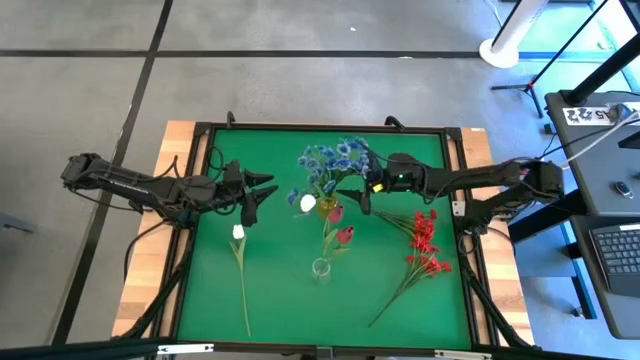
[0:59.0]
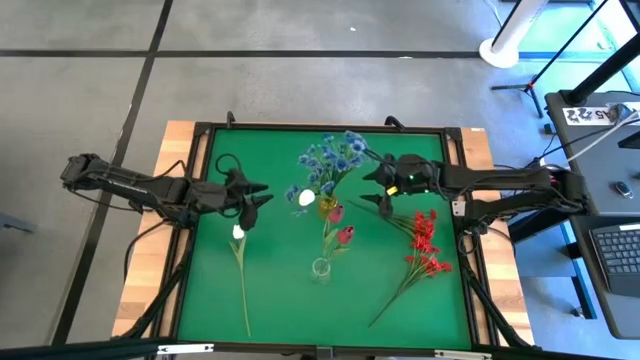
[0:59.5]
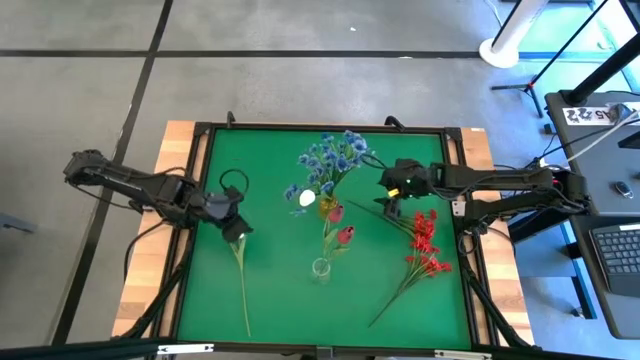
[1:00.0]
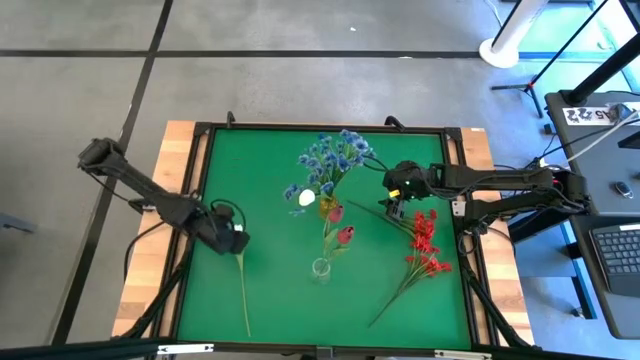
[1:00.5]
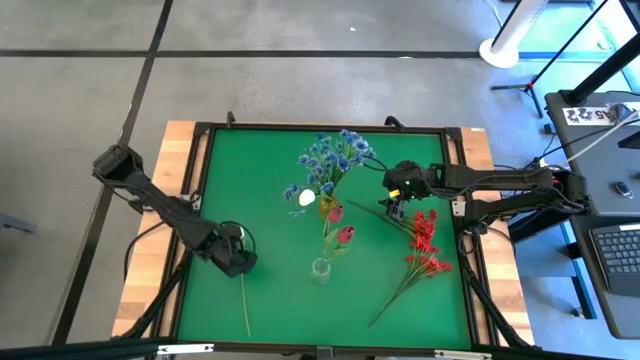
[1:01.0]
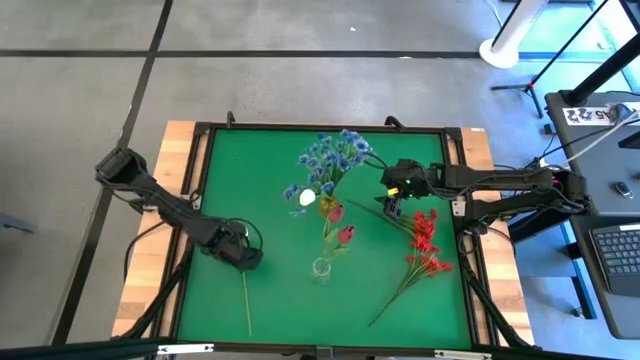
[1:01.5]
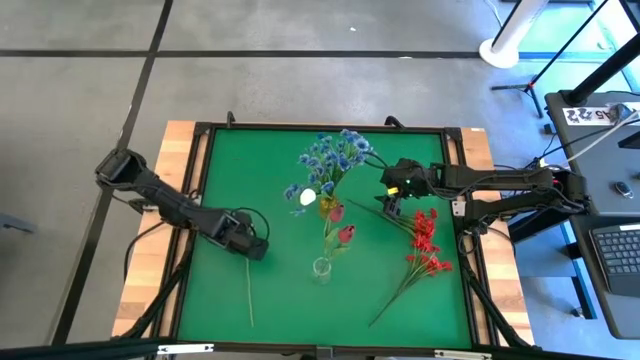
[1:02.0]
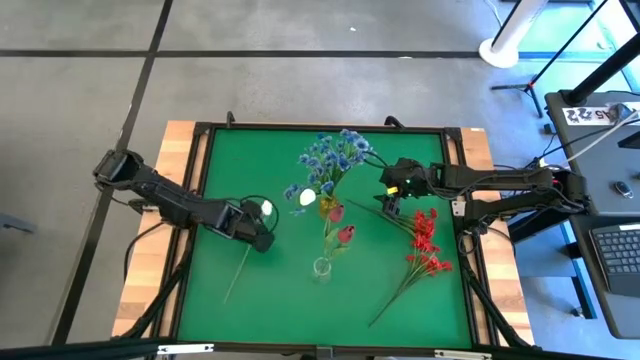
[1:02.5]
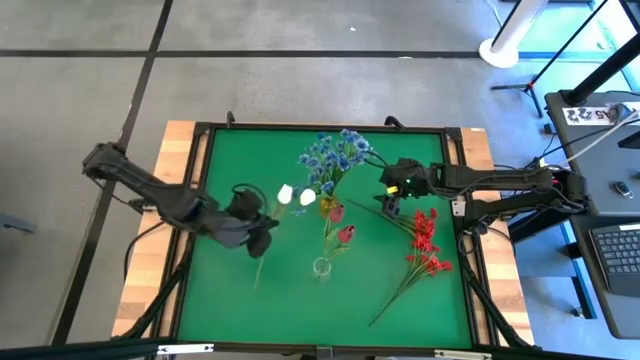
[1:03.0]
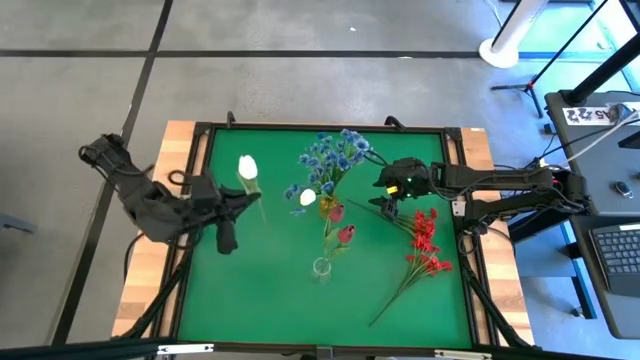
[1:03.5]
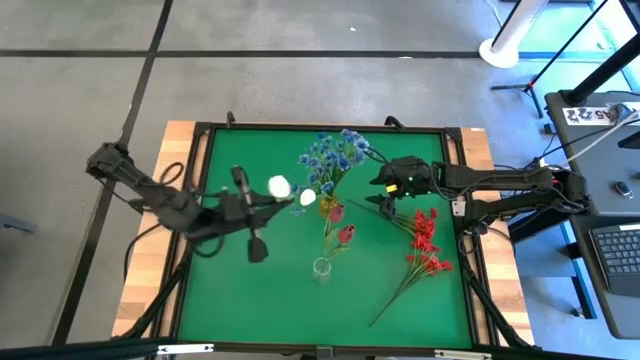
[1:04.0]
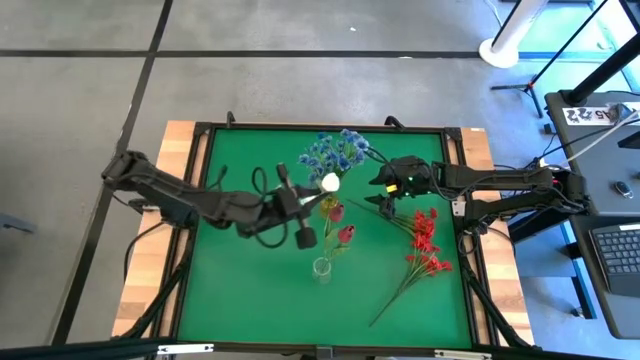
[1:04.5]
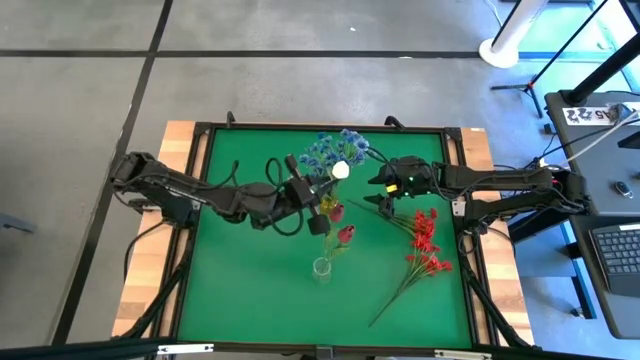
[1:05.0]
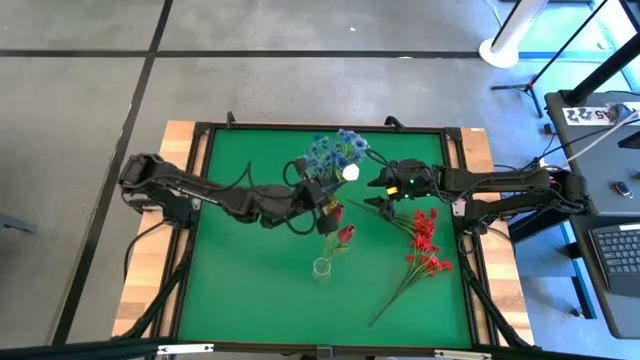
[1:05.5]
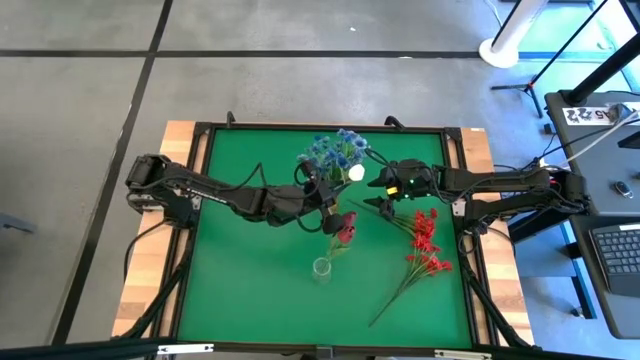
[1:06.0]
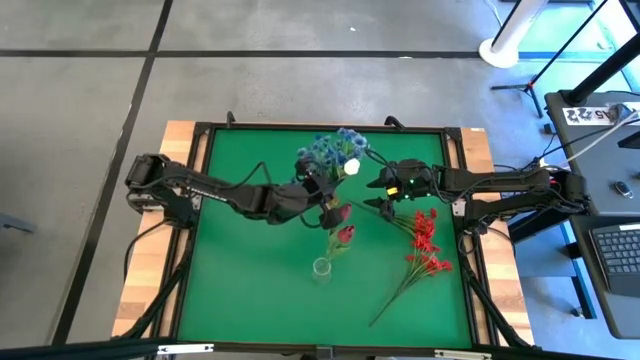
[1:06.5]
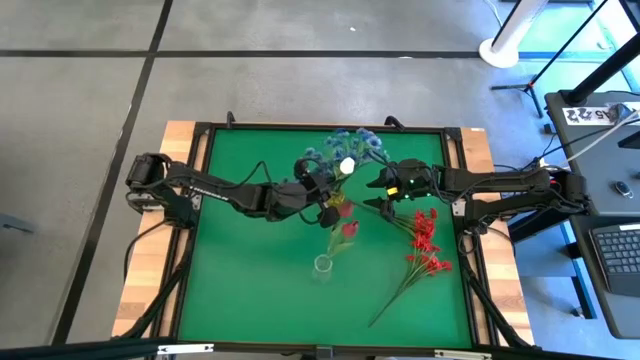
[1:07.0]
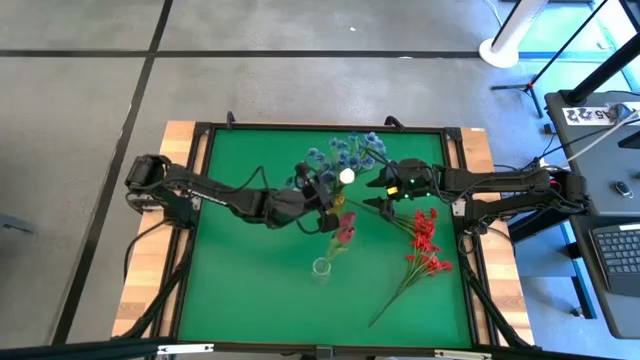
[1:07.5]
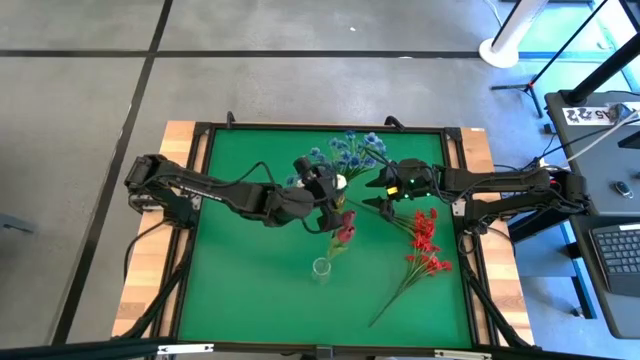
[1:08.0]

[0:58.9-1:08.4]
Task: Sort flowers into vase by color
Put the white flower into the yellow flower vase

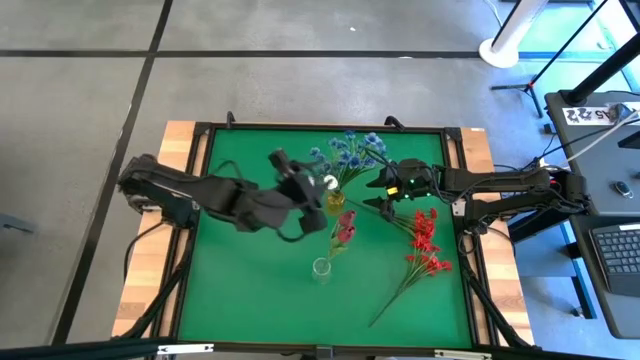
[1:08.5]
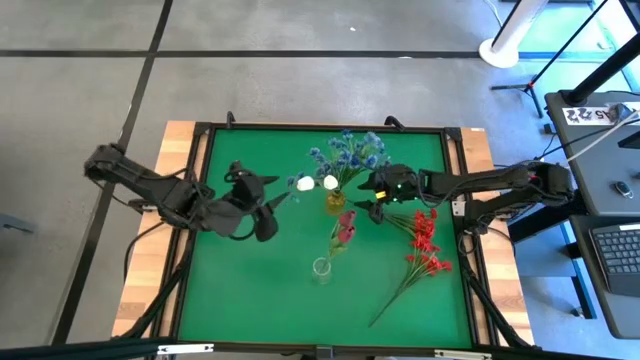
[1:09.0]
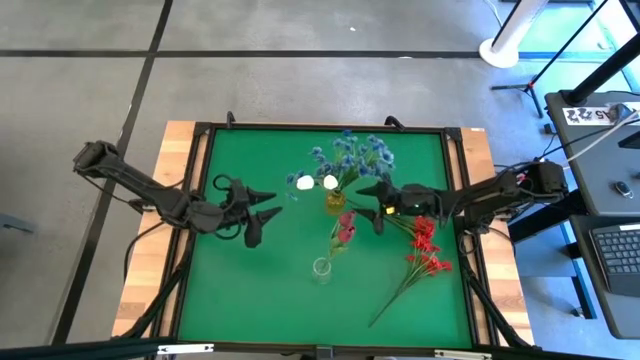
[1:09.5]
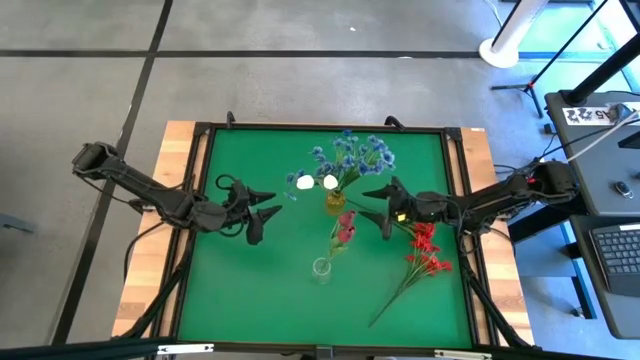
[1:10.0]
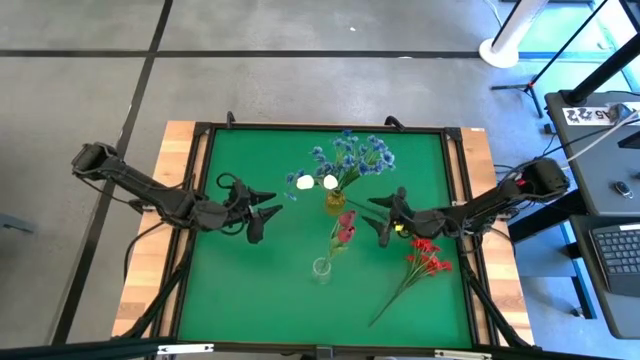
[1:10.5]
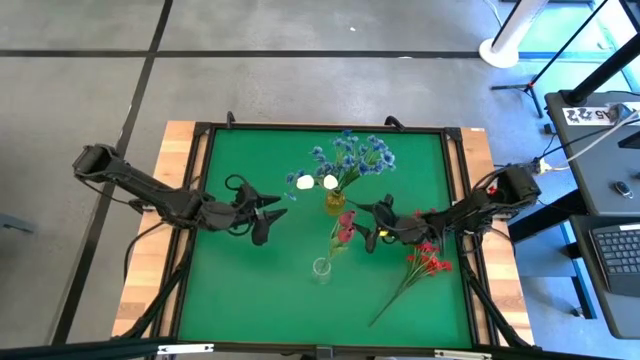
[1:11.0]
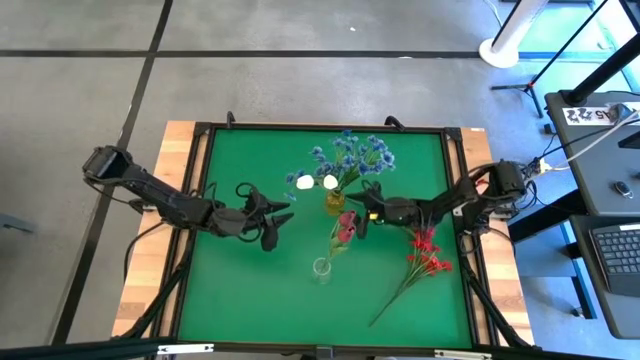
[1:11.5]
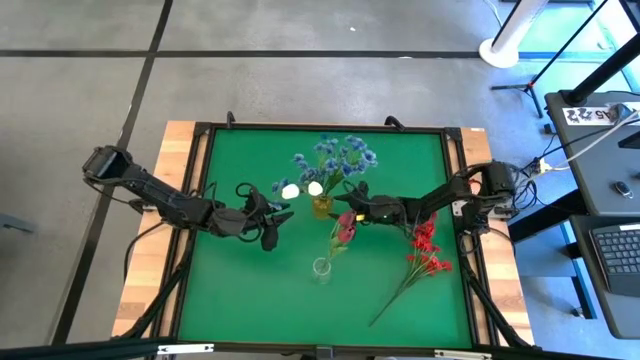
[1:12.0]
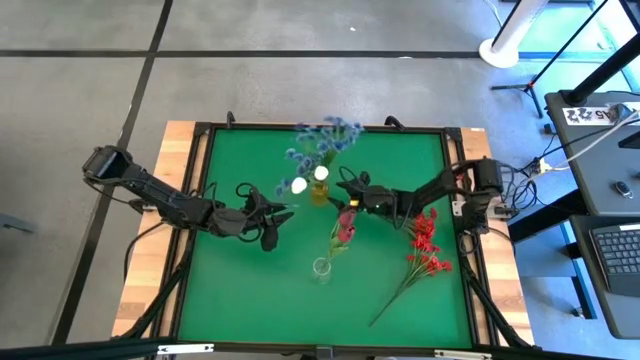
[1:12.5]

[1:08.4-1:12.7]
Adjust the yellow vase on the table

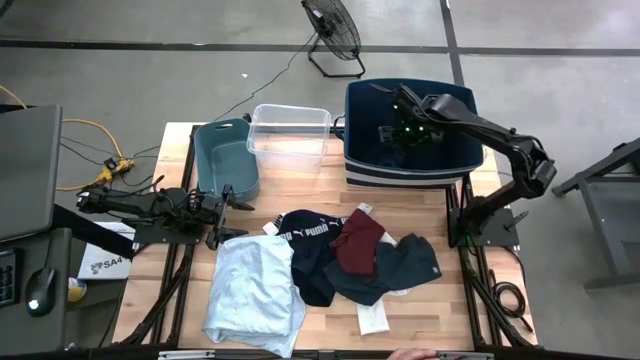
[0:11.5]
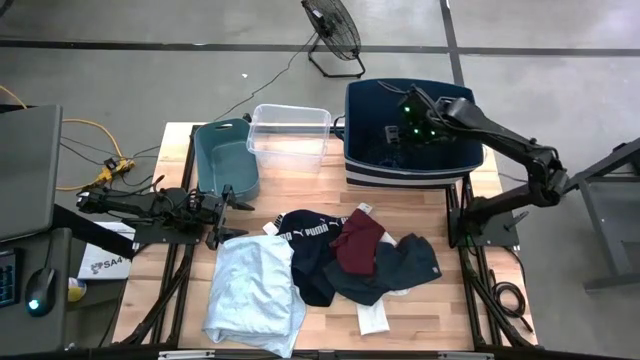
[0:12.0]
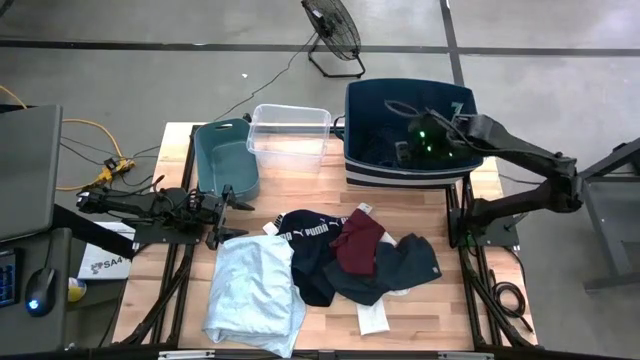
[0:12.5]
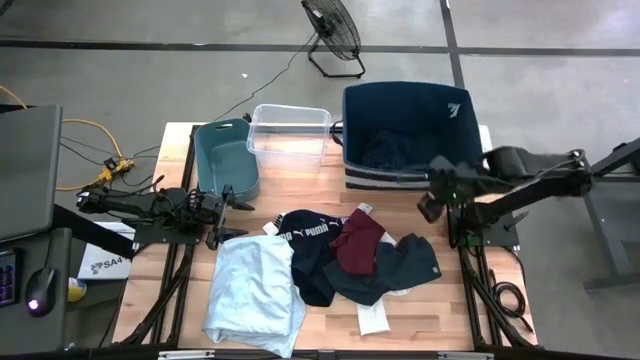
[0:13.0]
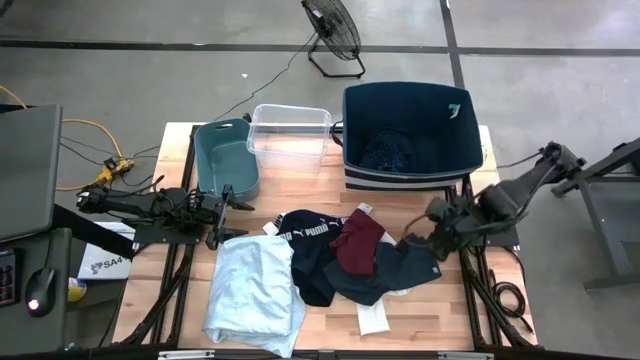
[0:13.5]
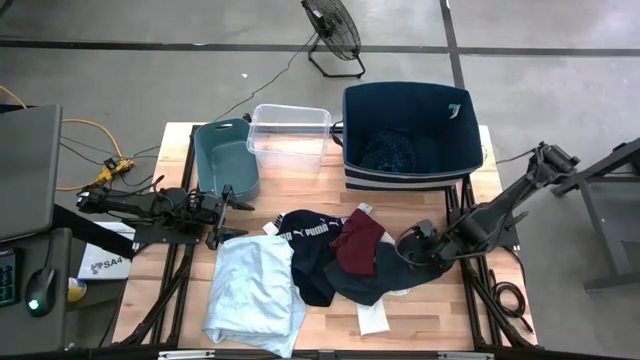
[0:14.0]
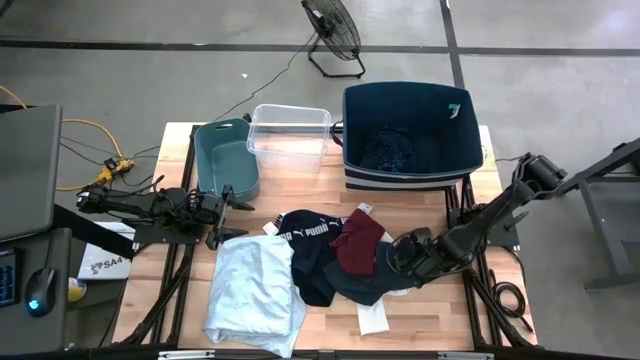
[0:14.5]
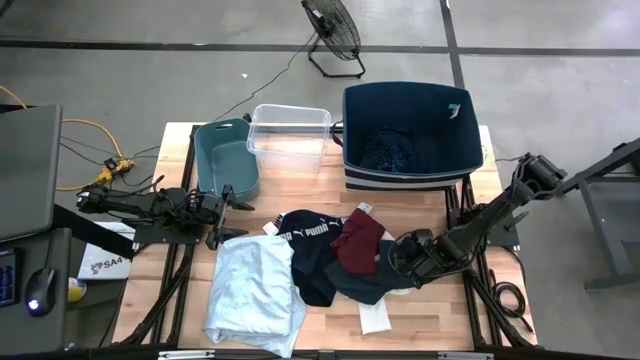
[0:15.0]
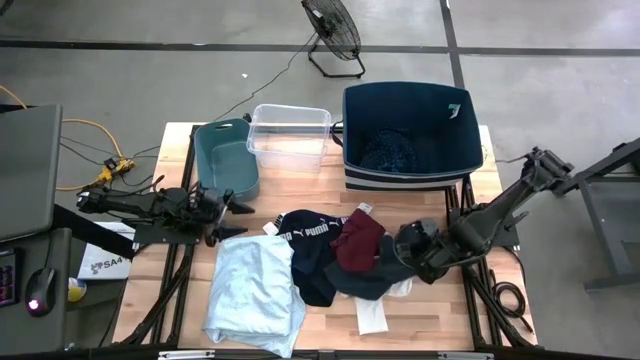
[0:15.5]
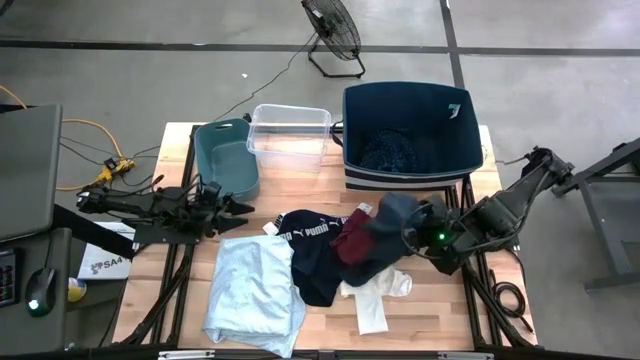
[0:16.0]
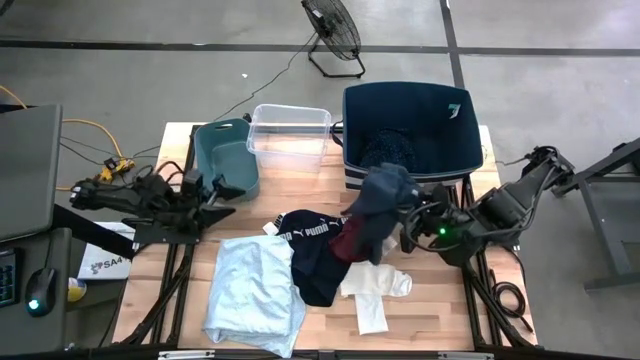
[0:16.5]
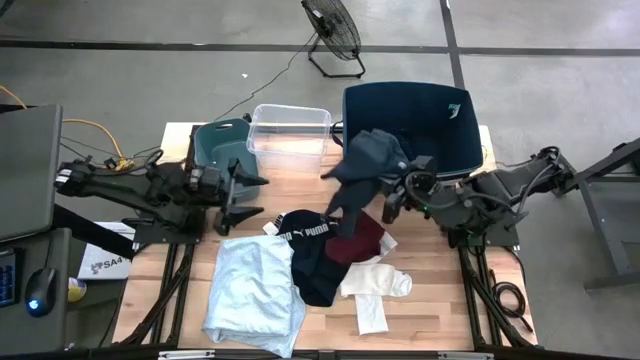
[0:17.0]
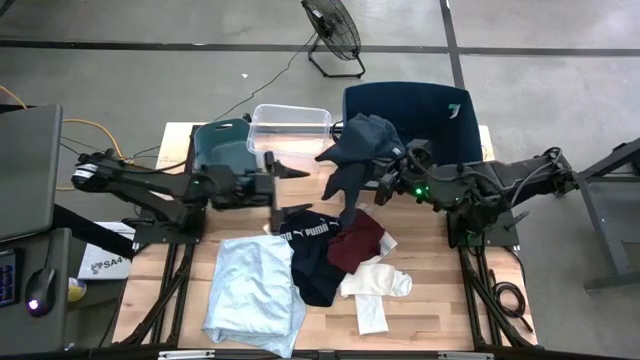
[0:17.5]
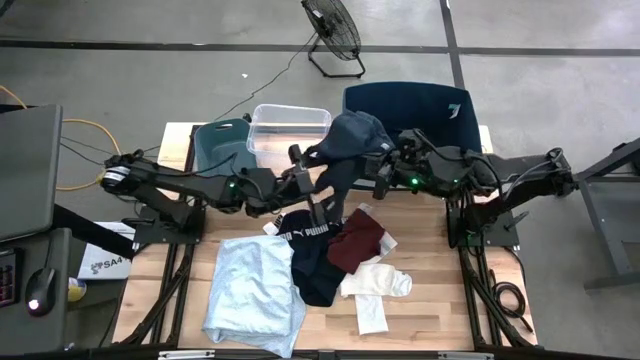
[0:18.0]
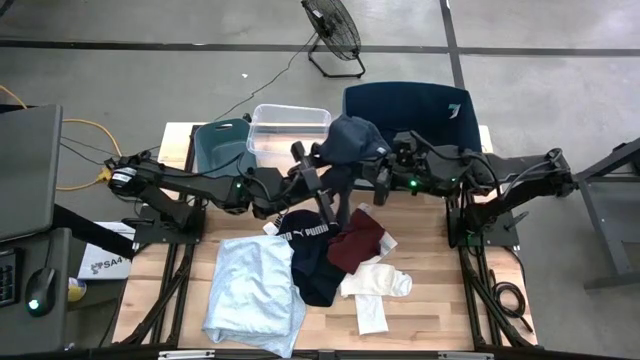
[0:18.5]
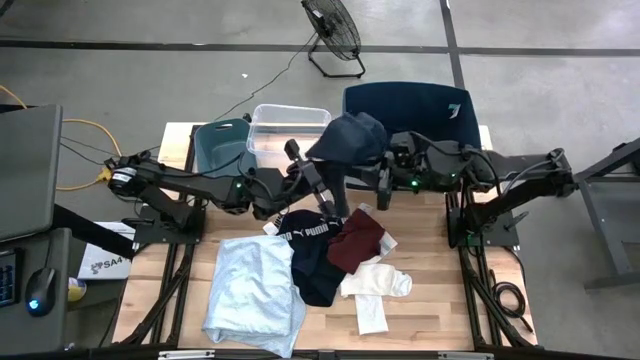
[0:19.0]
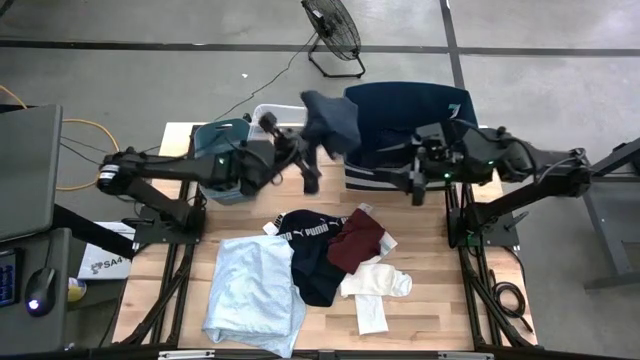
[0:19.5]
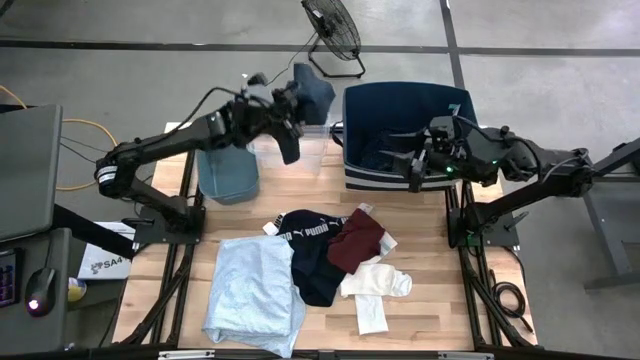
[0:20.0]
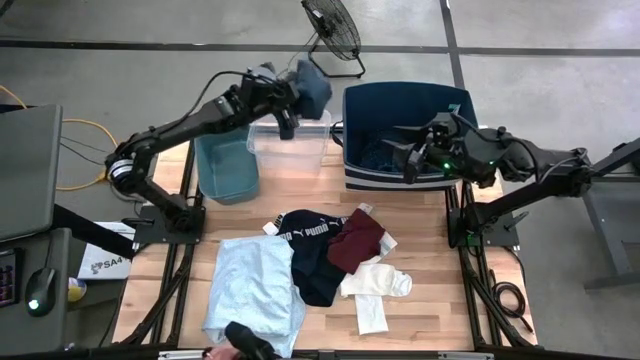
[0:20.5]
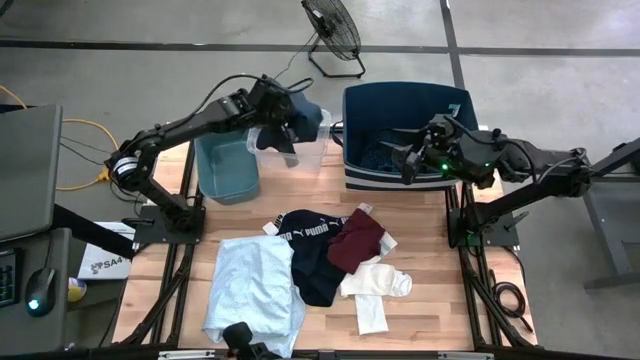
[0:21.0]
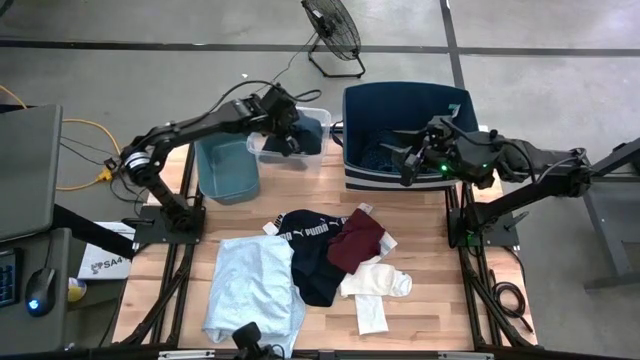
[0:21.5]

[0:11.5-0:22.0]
Task: Pick & Place Cloths
Put the blue shorts into the transparent bin
